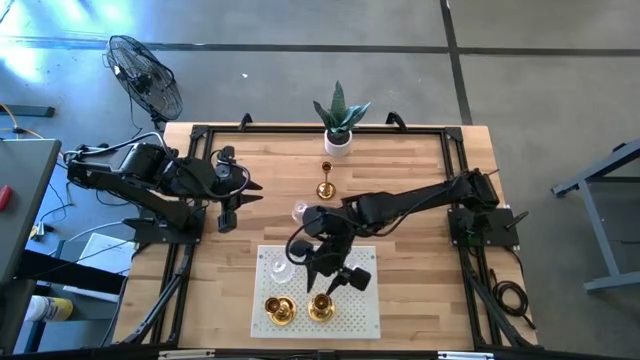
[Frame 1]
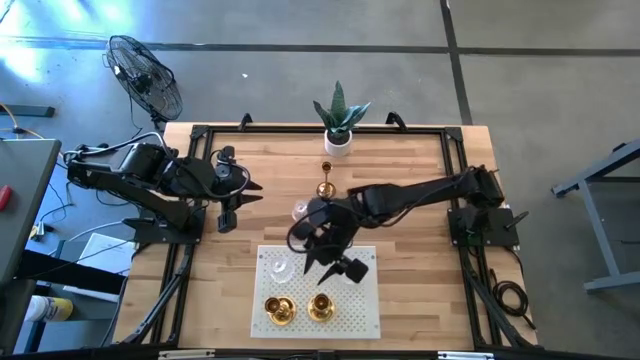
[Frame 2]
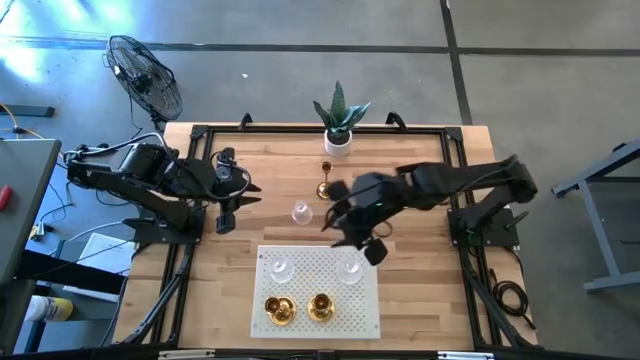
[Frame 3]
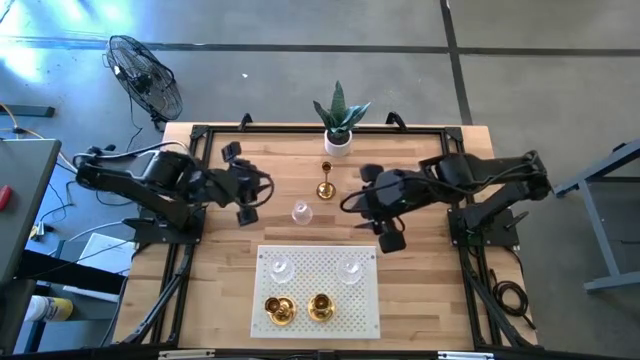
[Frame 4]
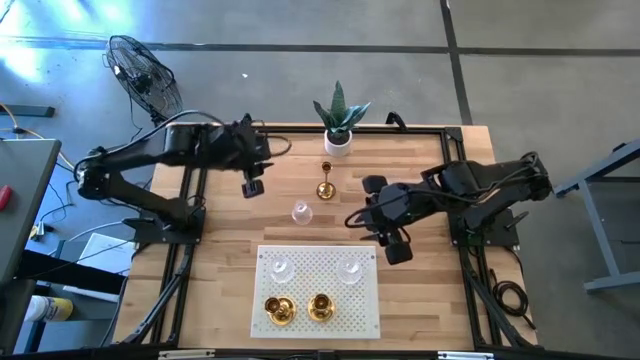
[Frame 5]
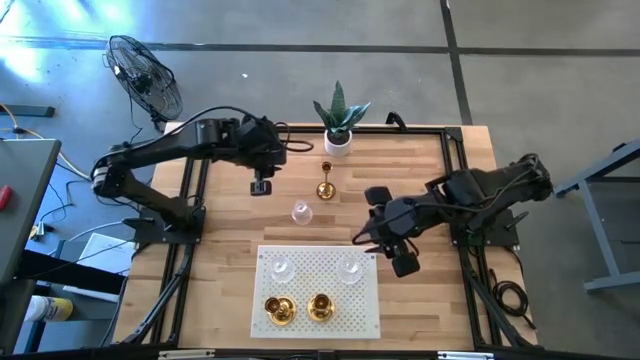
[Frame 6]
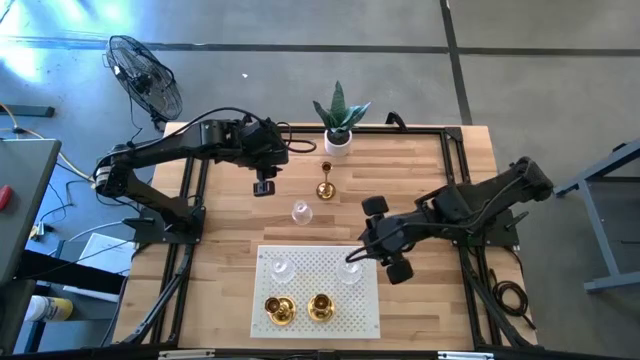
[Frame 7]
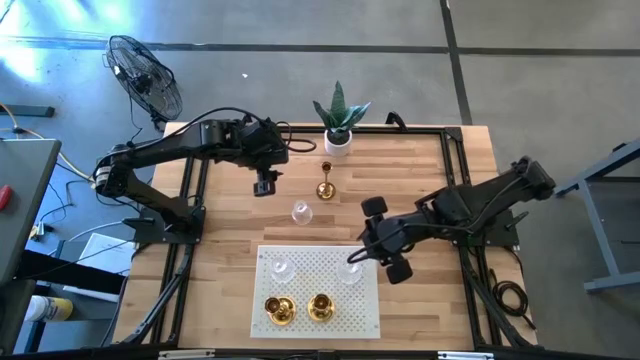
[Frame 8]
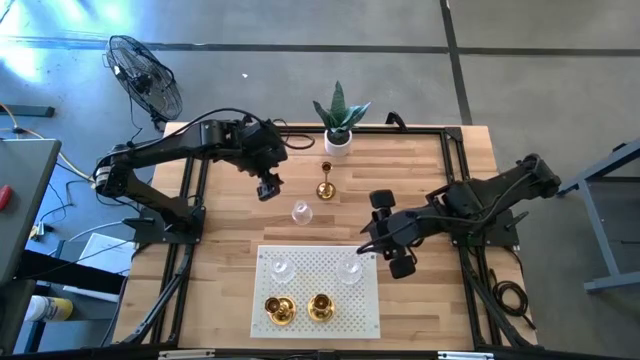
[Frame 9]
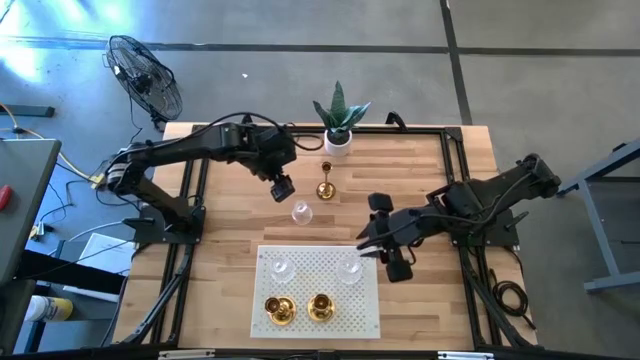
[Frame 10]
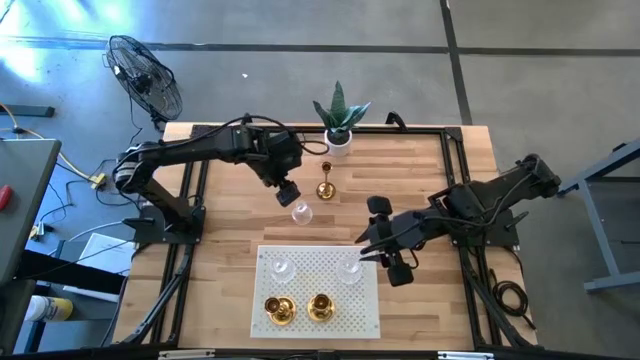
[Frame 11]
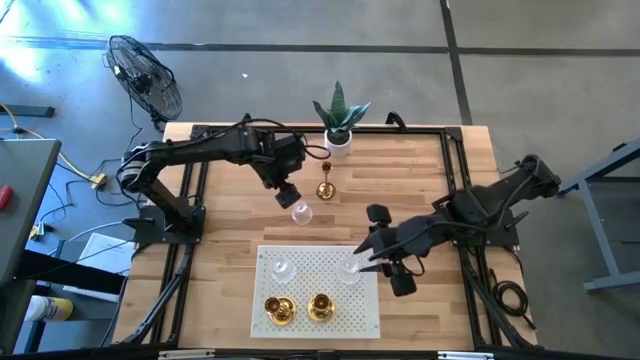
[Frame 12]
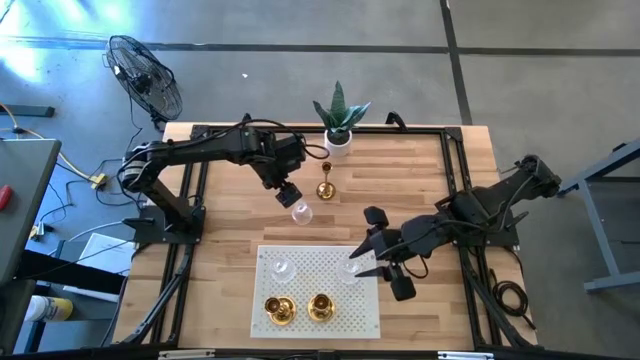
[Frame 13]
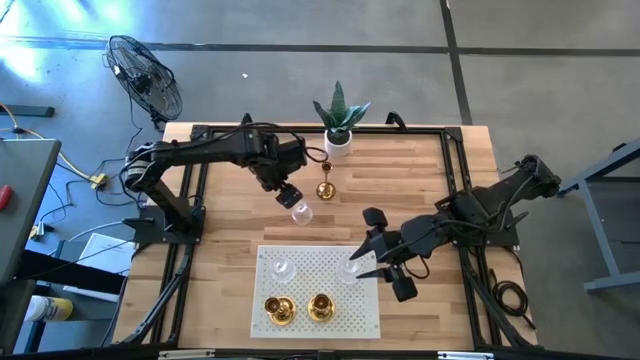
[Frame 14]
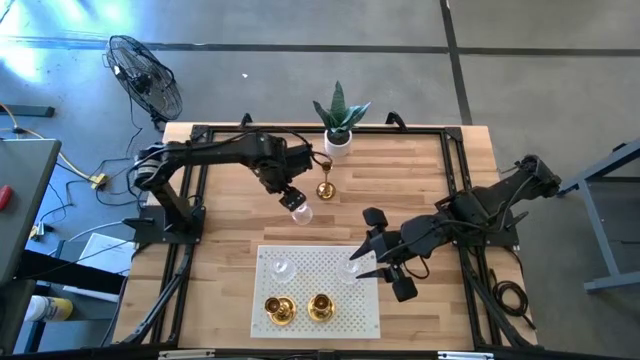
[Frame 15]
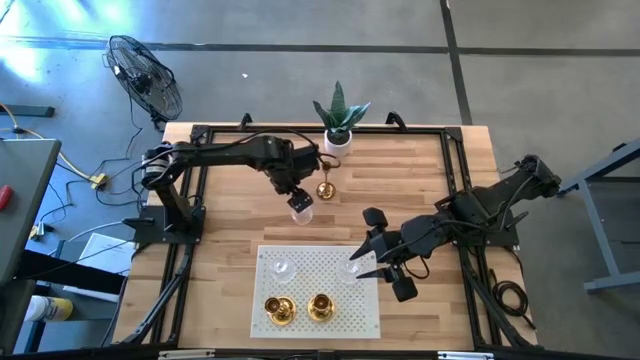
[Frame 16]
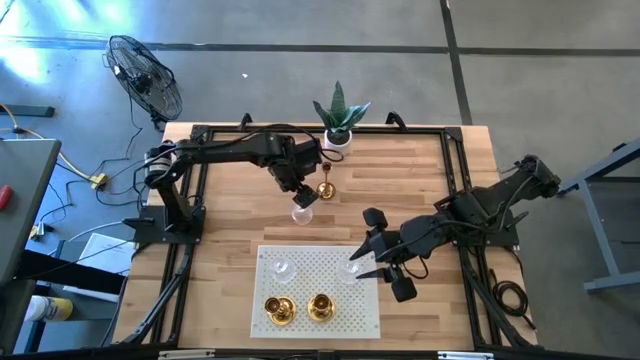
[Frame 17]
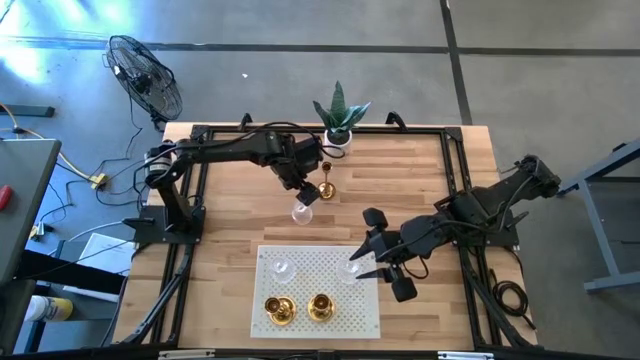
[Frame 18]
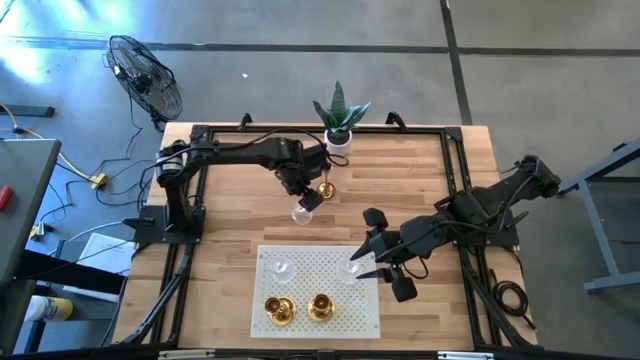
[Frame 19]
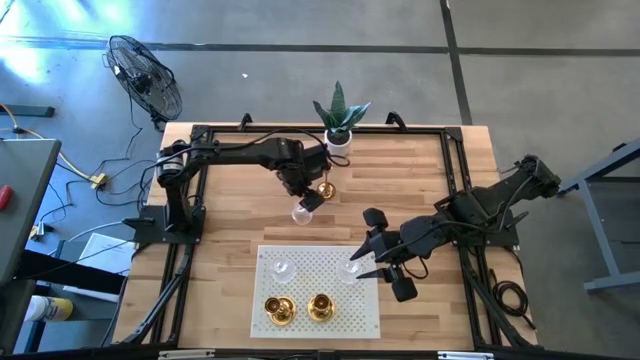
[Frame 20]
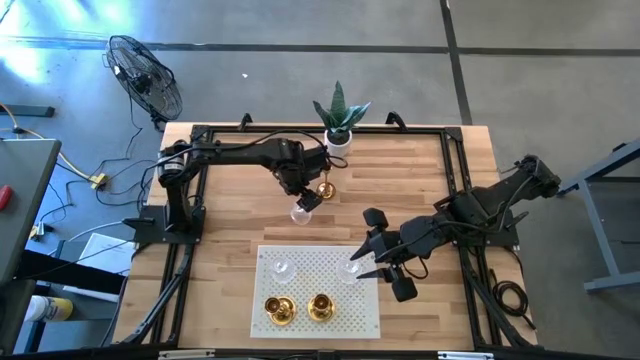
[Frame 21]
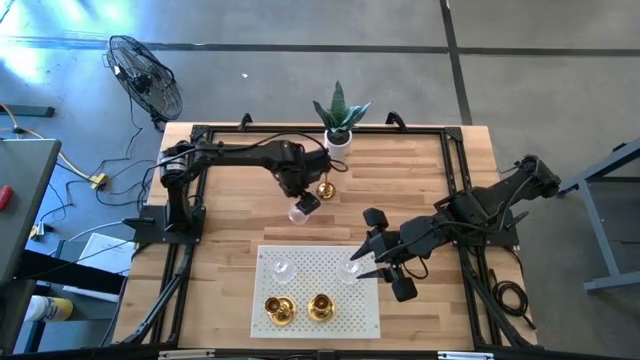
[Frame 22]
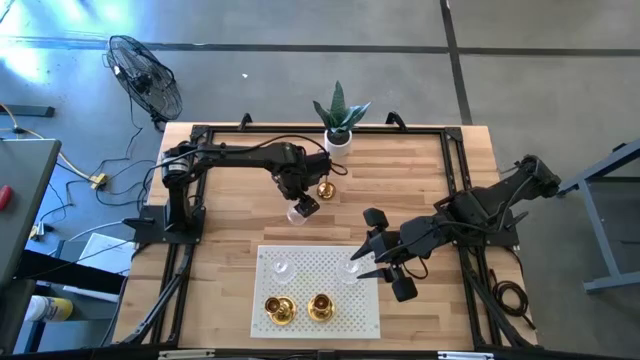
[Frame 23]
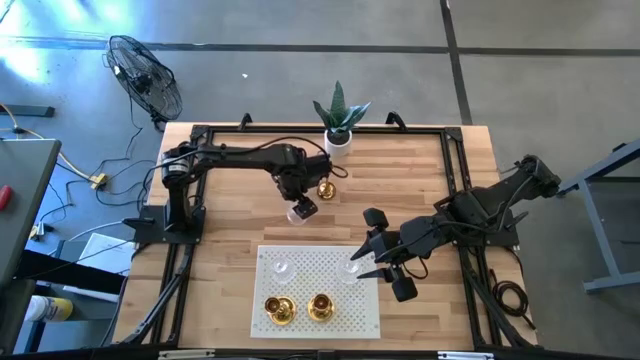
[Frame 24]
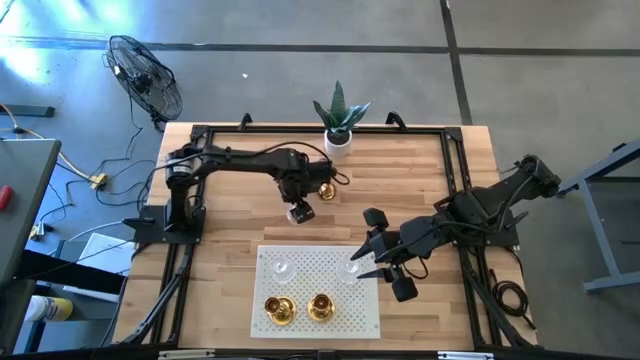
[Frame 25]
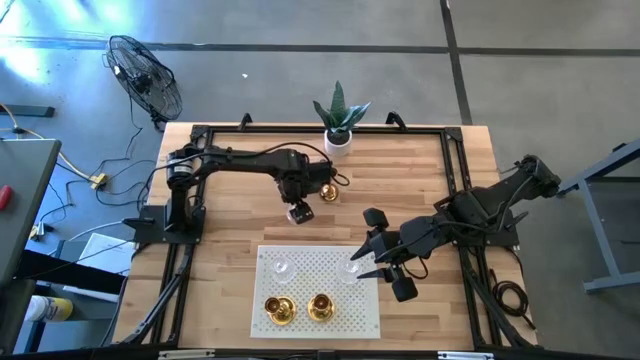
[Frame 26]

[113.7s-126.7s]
Task: Pick & Place candle stick holders
Put the transparent candle holder on the shelf

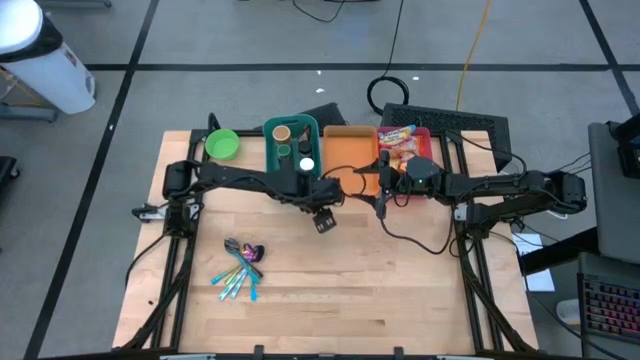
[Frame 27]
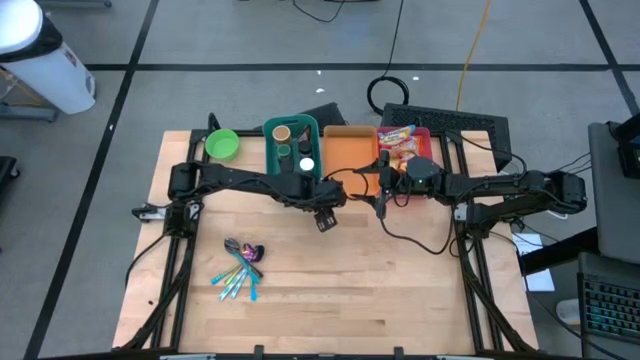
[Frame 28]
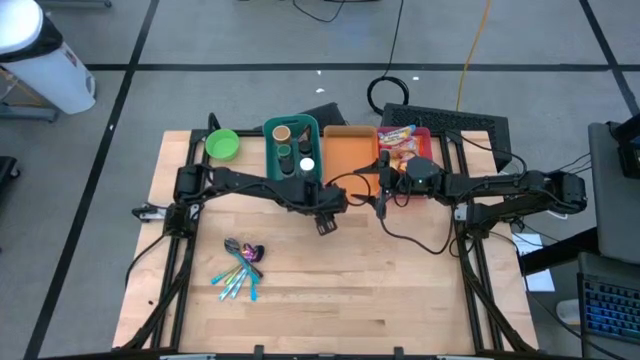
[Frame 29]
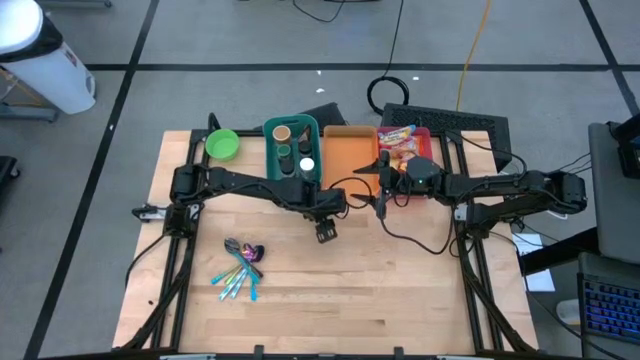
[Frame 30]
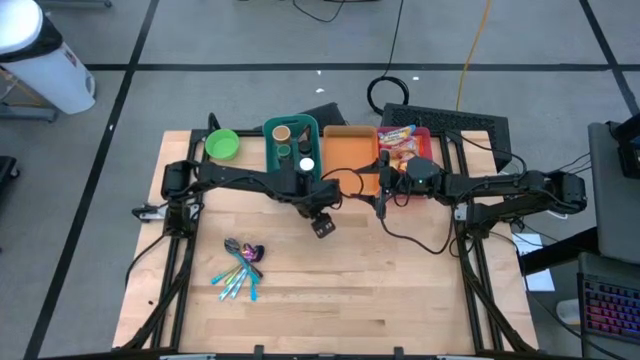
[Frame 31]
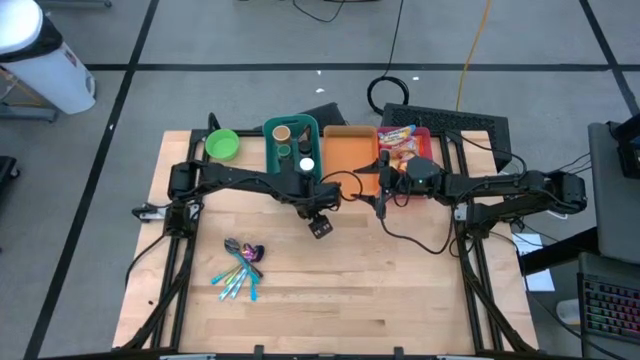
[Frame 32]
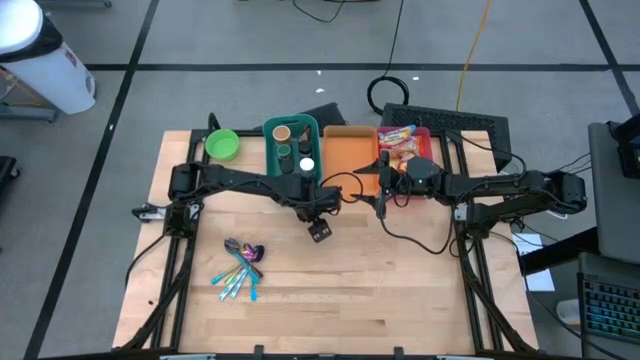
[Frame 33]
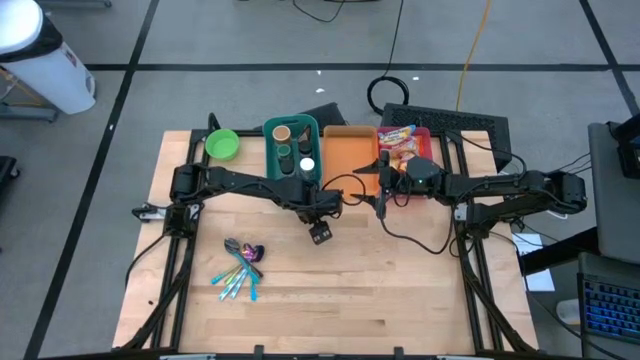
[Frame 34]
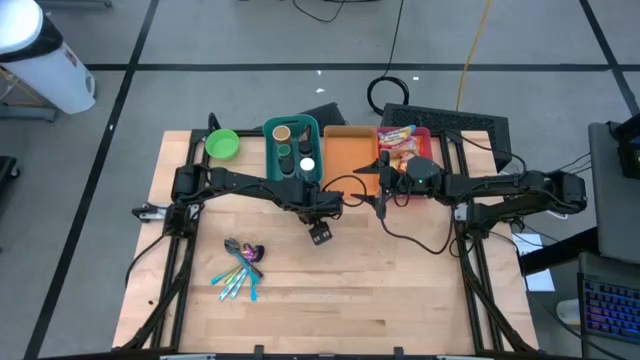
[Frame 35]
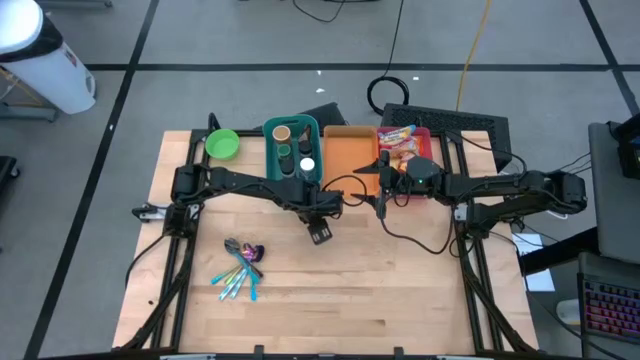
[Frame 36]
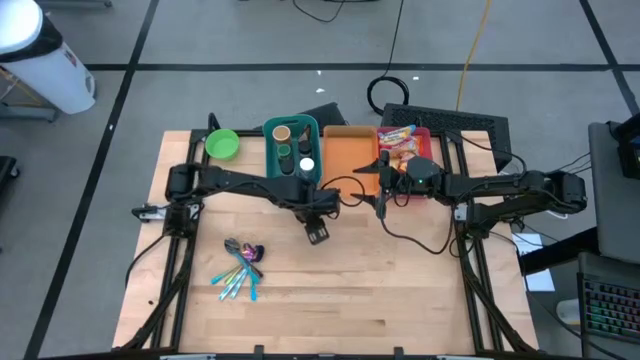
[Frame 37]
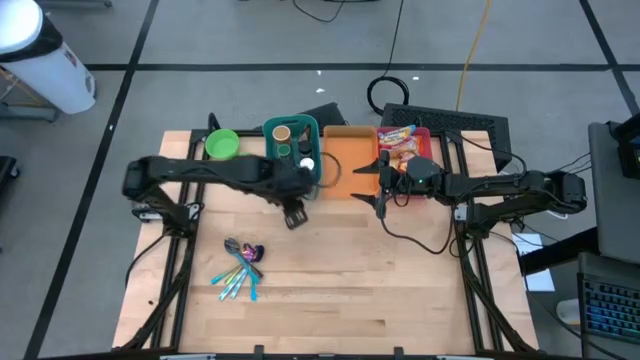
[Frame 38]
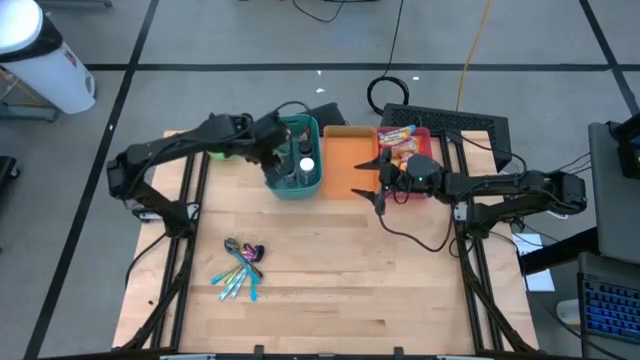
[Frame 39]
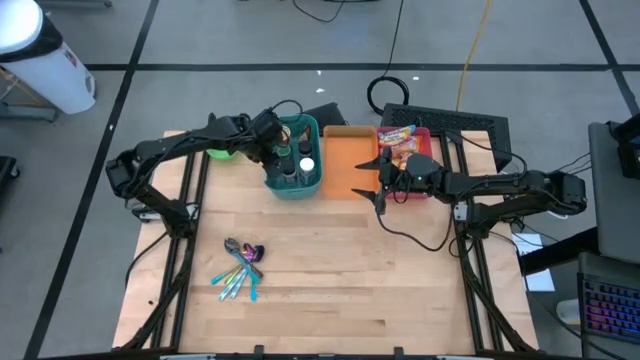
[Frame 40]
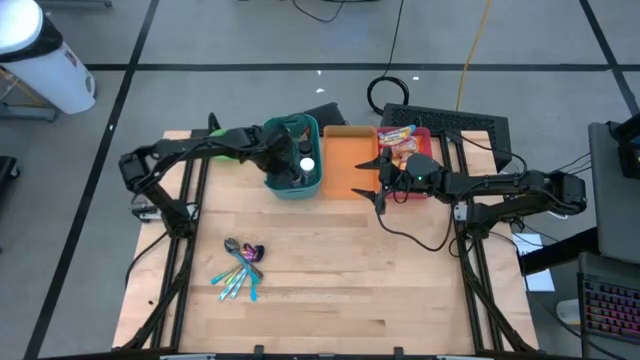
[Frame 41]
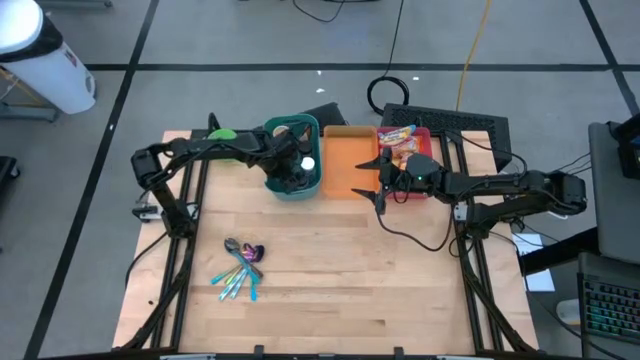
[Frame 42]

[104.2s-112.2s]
Task: Pick & Place Food Item
Put the brown seasoning bottle into the green bin
